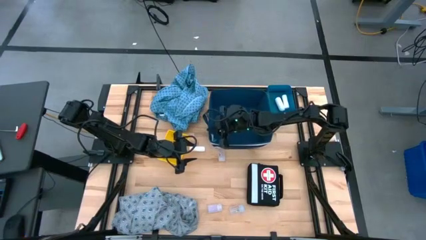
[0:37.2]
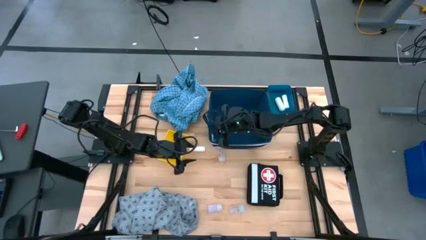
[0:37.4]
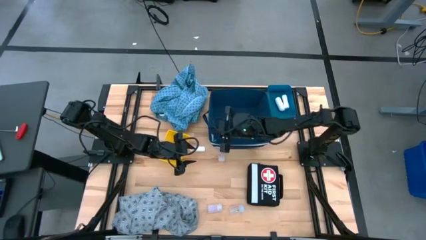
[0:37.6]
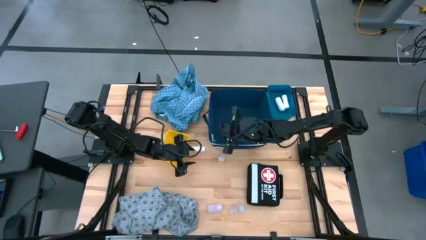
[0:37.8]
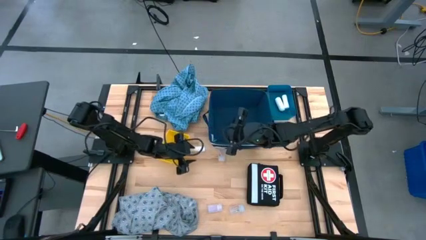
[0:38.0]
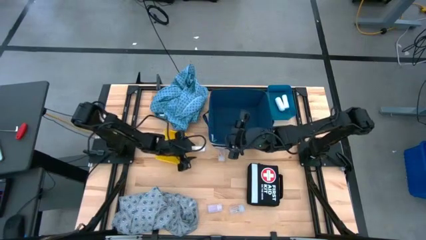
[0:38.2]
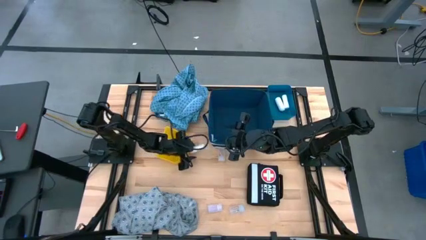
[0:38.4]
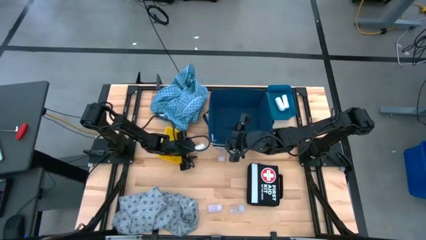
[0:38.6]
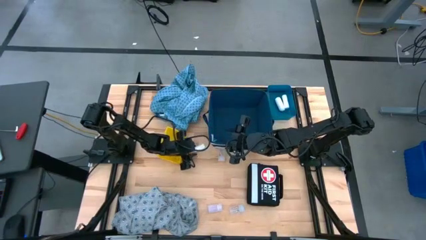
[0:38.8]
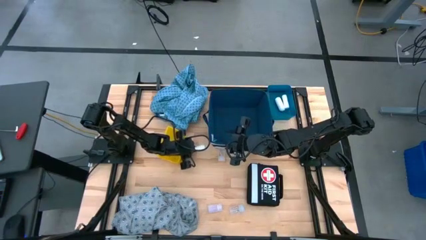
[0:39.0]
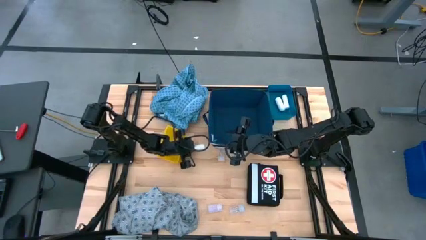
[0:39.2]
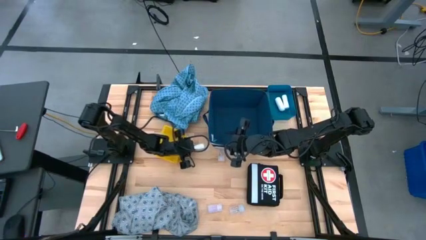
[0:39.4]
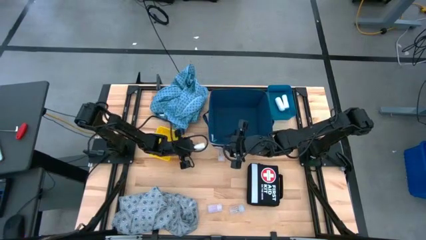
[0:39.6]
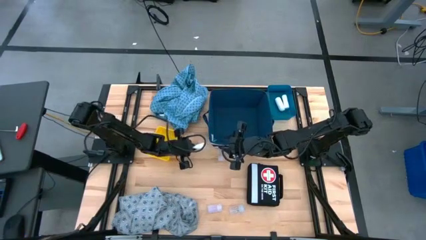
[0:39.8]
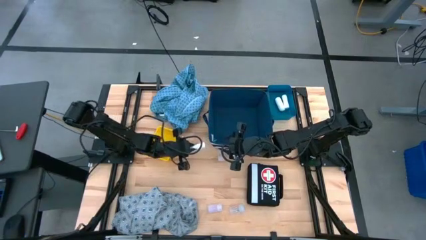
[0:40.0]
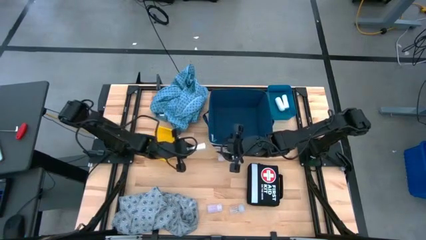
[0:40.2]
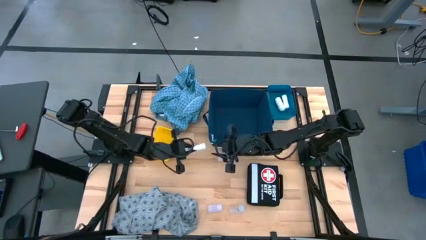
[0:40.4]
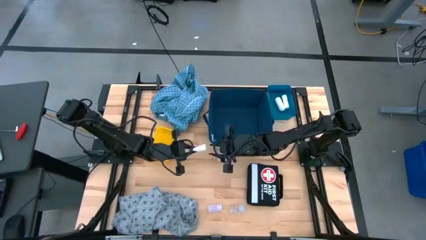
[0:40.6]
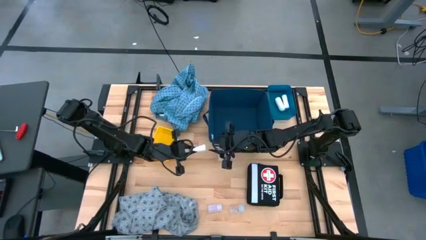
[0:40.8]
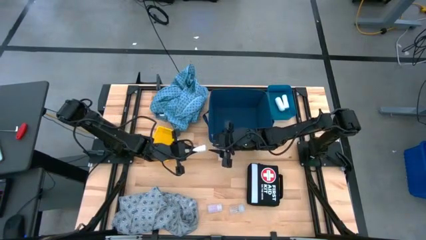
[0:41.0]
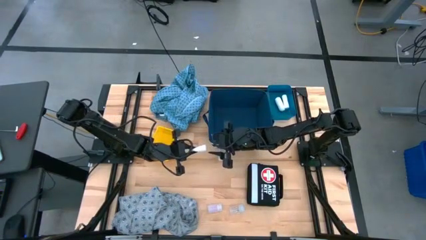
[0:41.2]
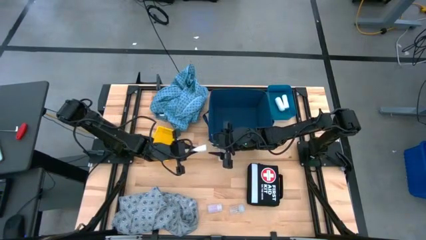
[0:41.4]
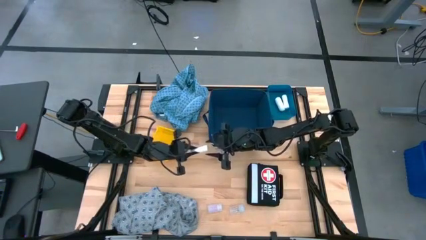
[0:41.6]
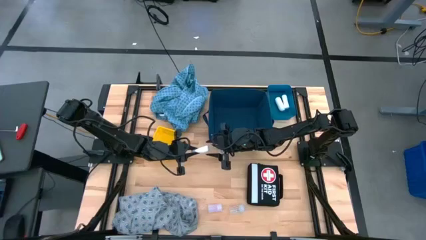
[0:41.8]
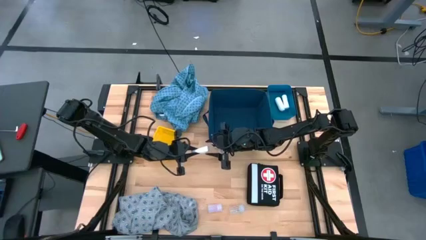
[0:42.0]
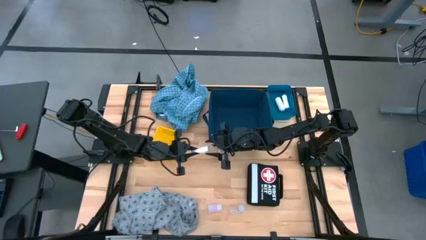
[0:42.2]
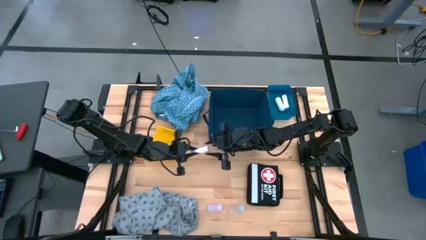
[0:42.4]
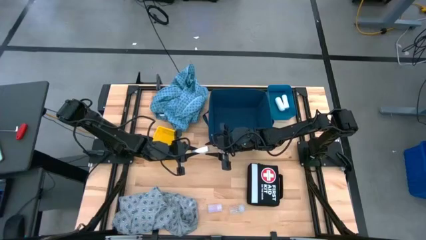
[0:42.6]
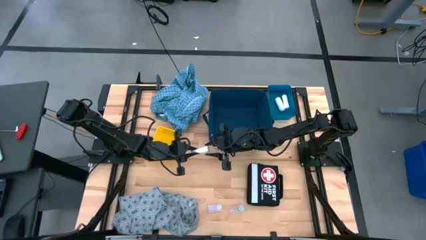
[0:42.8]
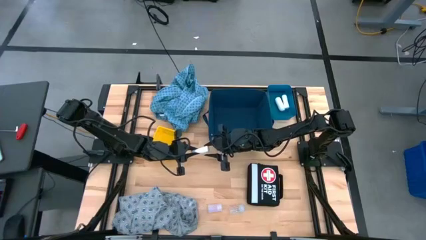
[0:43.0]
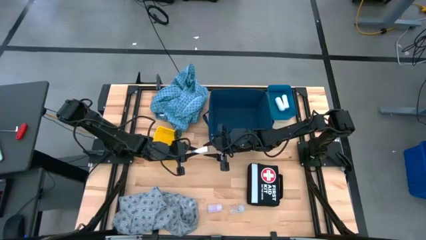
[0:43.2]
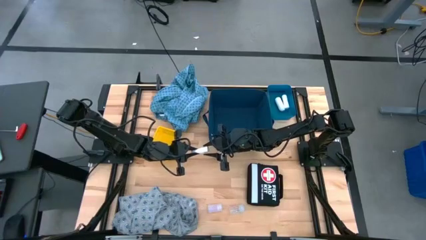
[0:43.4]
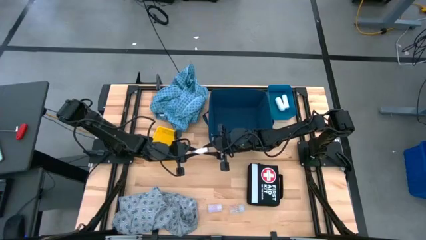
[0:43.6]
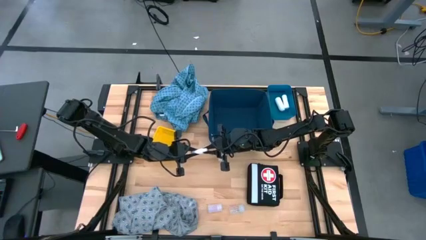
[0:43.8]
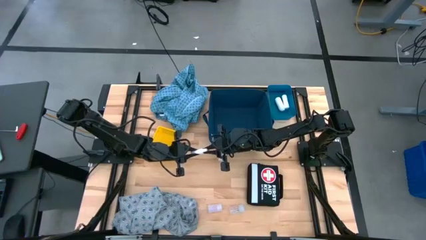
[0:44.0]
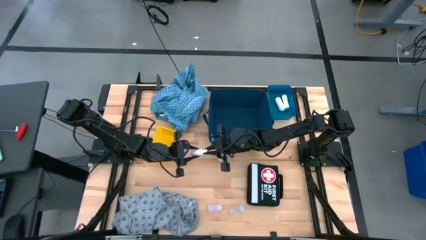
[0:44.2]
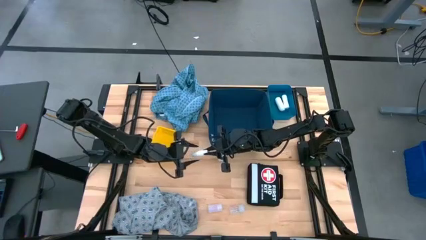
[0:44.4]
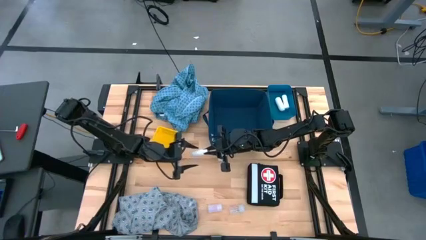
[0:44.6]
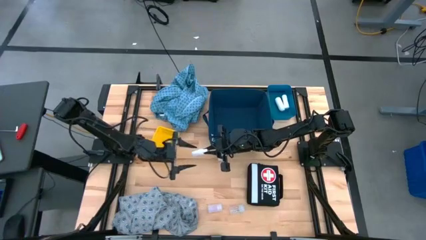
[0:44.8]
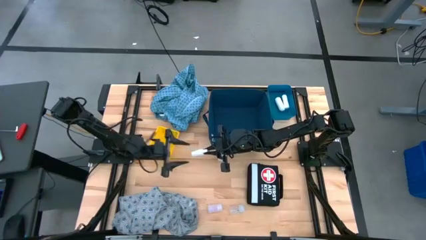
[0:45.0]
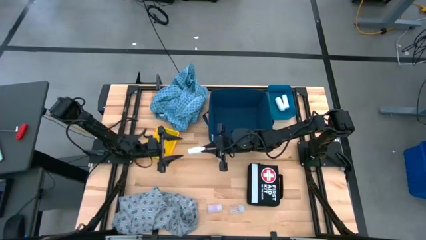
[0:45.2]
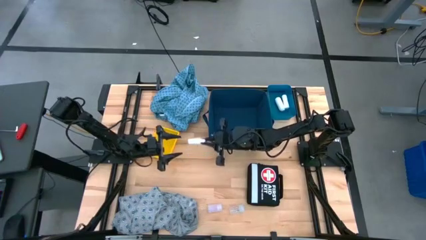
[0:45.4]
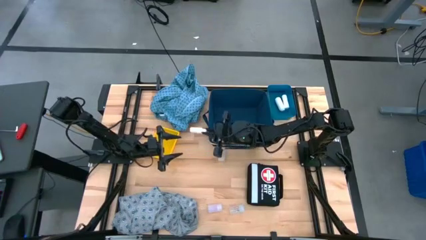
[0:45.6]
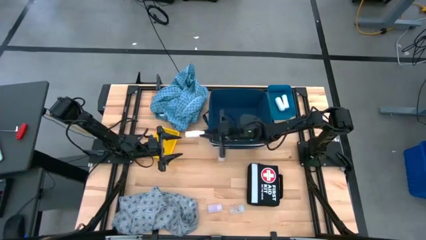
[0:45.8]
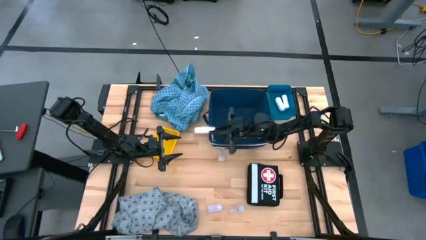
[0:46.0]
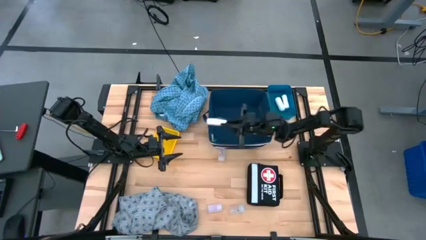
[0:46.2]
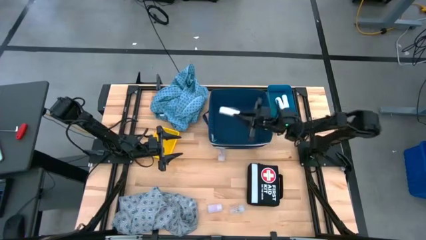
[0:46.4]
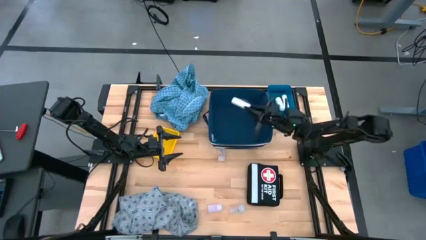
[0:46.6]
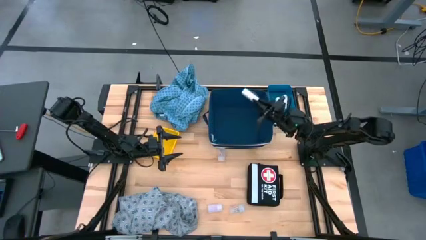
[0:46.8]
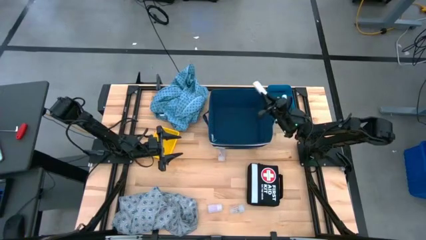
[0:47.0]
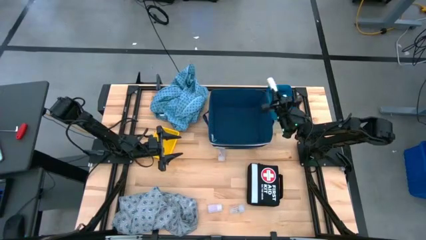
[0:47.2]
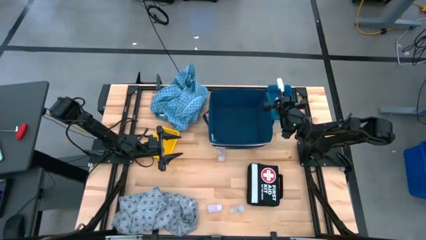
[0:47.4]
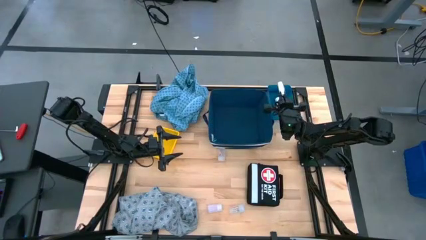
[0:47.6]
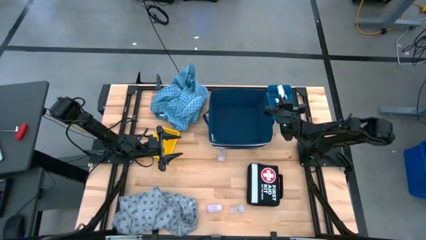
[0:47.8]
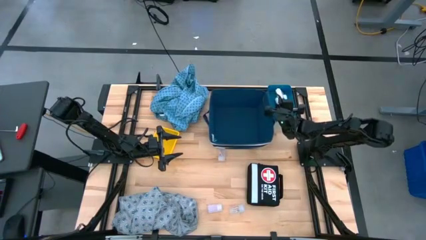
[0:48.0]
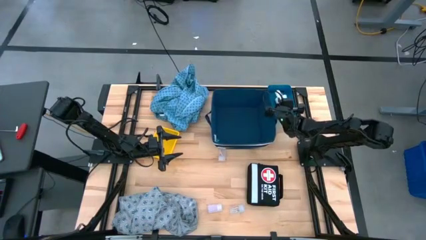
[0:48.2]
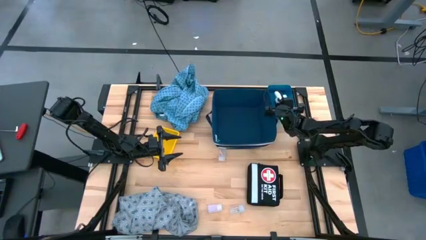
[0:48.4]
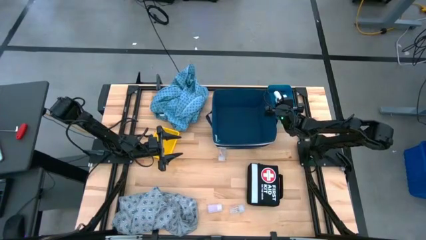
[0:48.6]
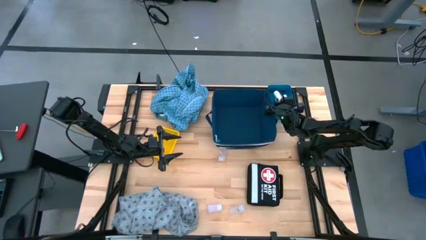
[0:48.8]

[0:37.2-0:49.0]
Task: Pick & place medical supplies in basket/bin
Put the white rolled gauze into the blue bin

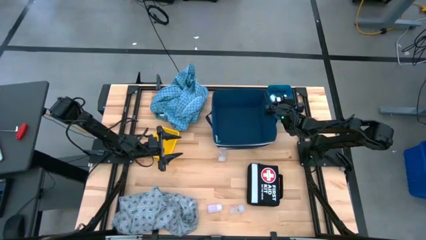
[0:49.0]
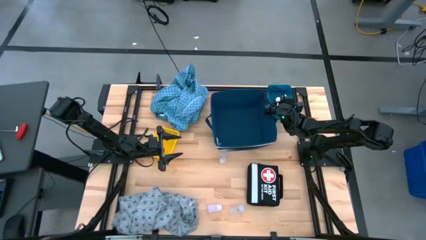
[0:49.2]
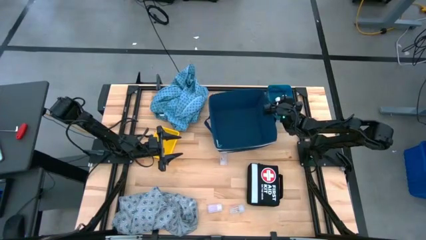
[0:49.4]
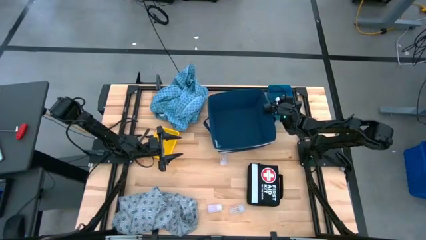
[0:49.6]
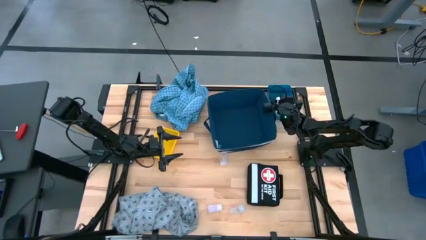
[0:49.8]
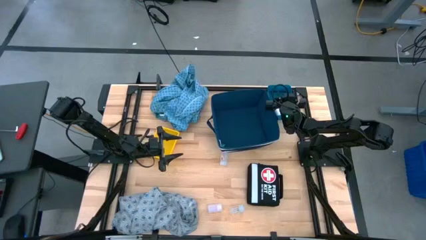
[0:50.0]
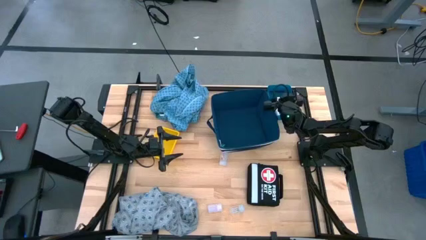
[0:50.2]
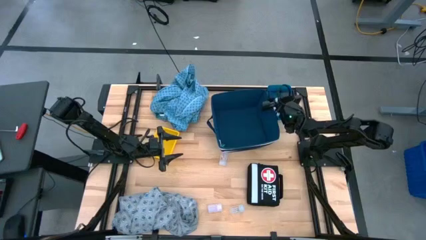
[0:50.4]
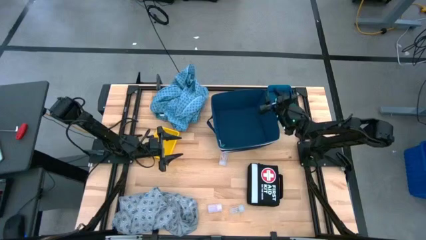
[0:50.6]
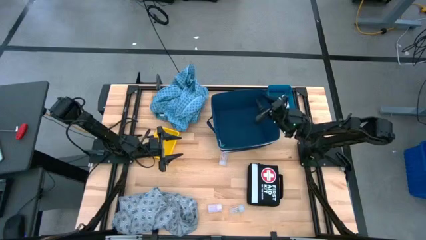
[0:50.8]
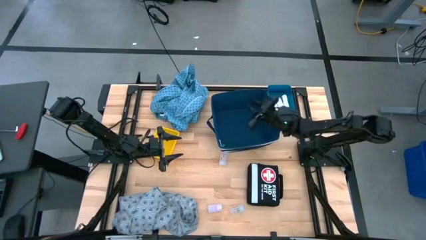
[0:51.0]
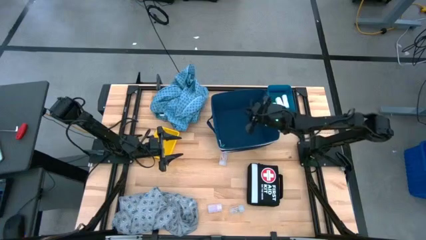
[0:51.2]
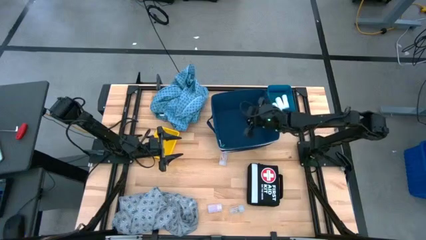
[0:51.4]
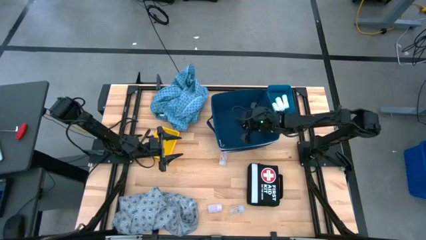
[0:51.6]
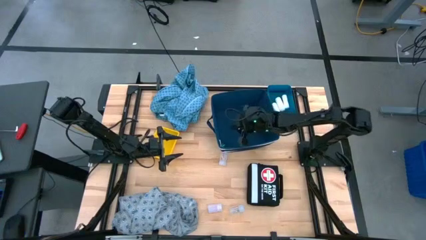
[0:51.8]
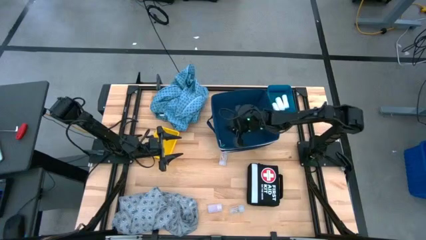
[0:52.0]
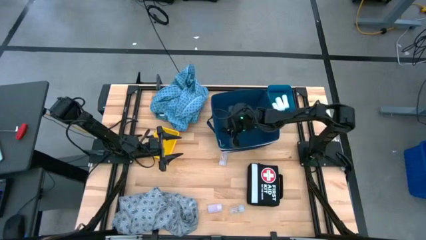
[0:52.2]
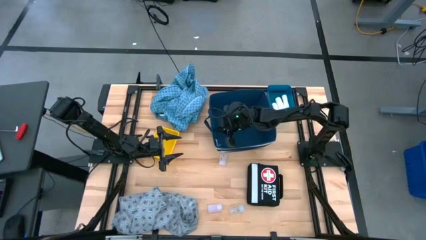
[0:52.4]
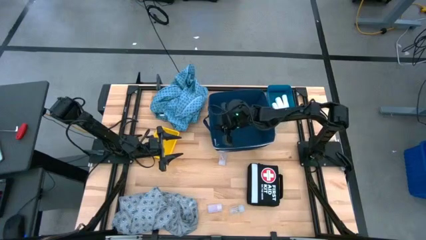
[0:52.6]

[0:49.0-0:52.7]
Adjust the blue laundry organizer
